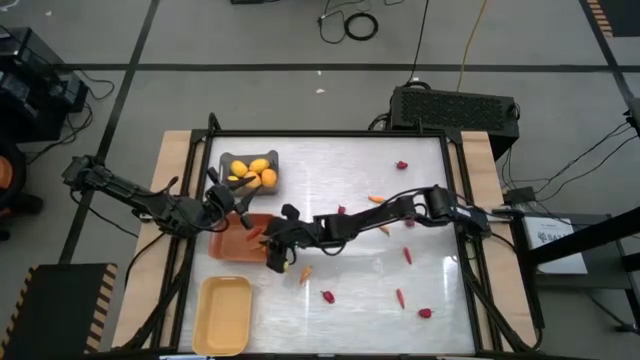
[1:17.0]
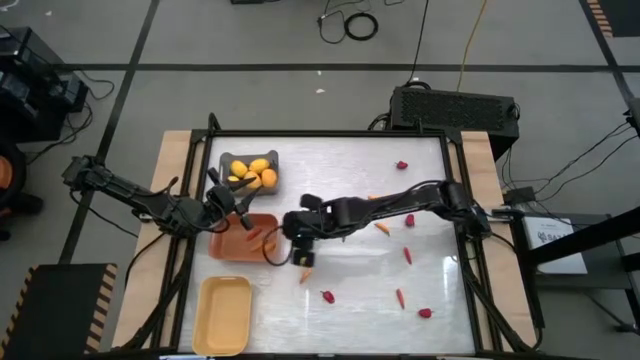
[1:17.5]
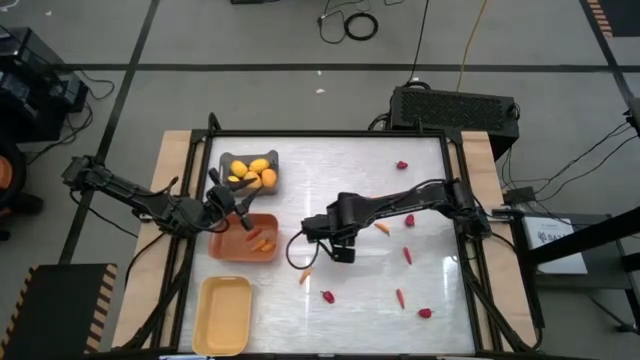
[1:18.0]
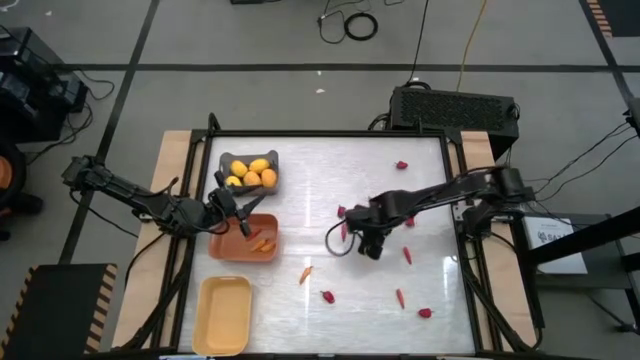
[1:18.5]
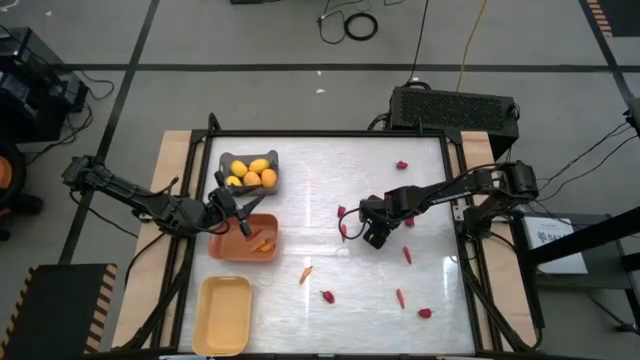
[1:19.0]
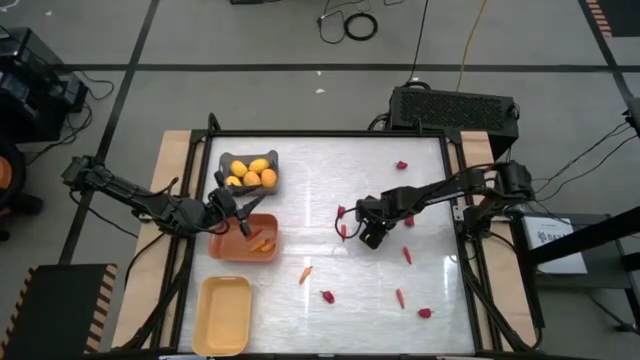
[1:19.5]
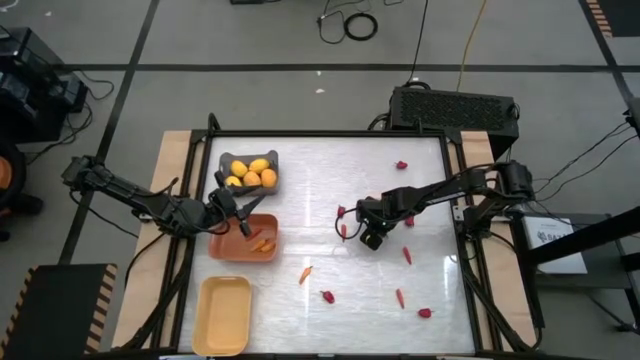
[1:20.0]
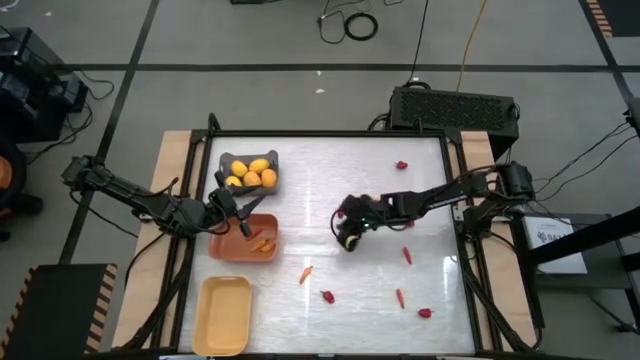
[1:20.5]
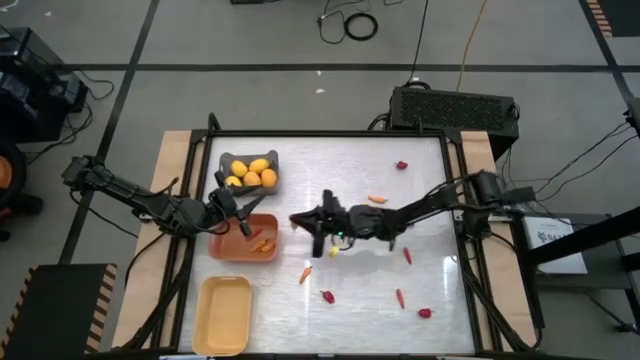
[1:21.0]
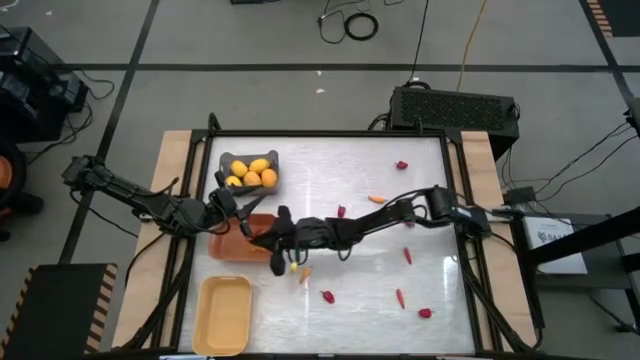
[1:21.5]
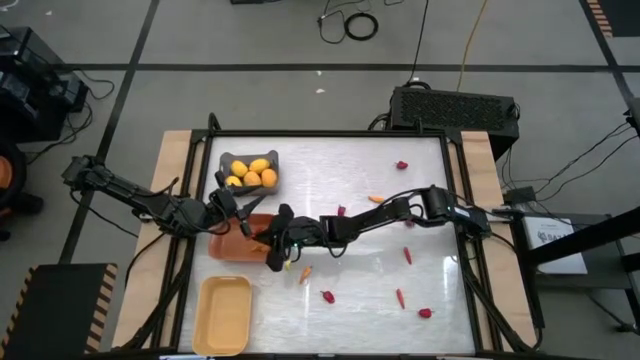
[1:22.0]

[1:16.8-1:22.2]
Task: Sort produce into baskets
Put the yellow chili pepper into the orange bin

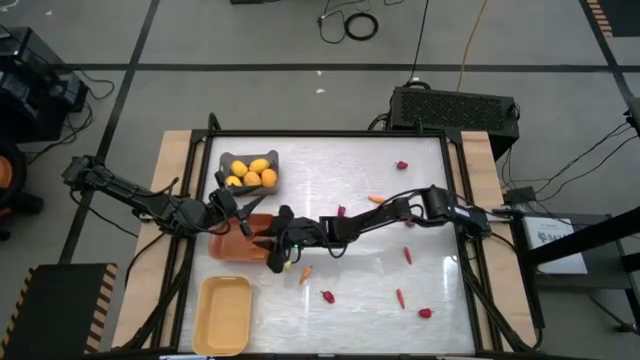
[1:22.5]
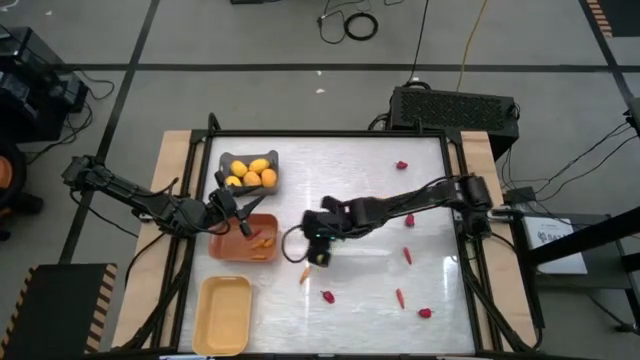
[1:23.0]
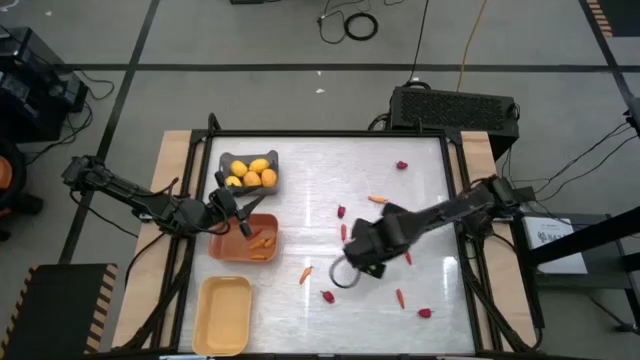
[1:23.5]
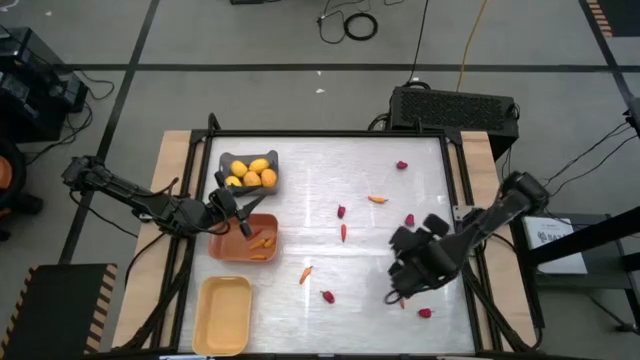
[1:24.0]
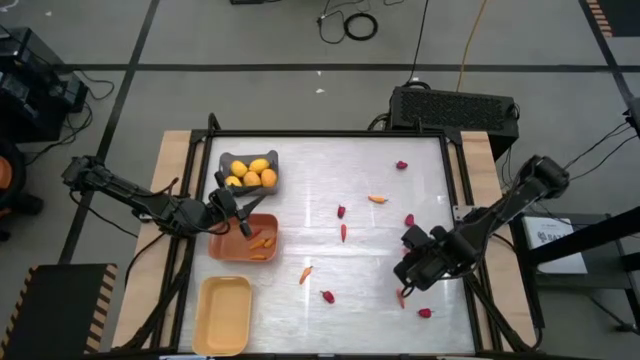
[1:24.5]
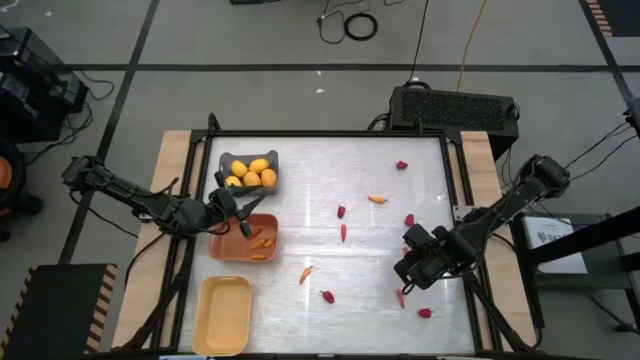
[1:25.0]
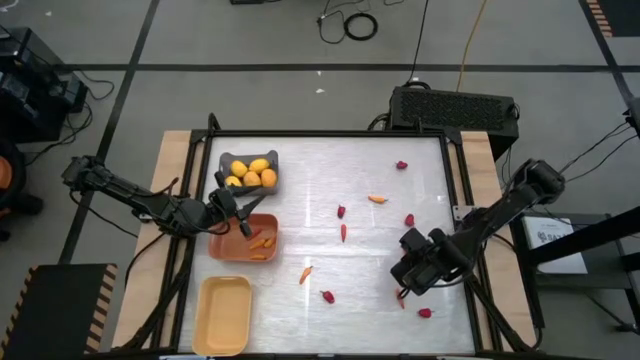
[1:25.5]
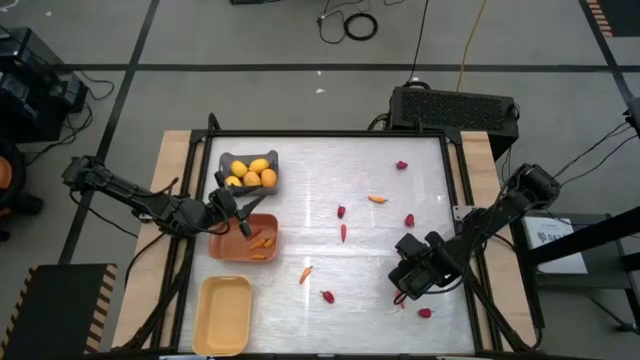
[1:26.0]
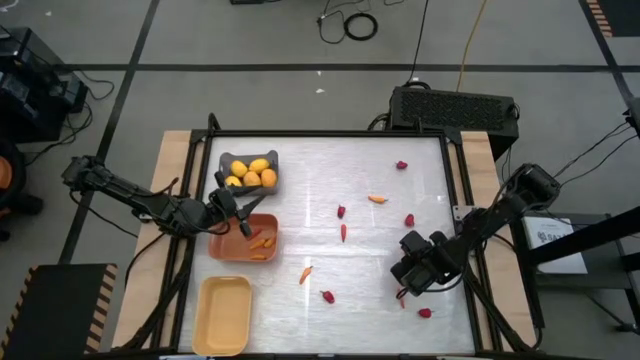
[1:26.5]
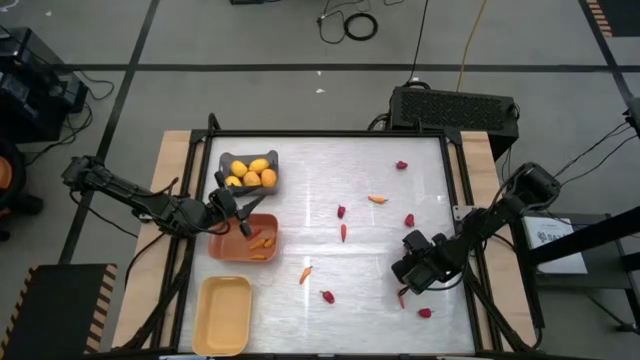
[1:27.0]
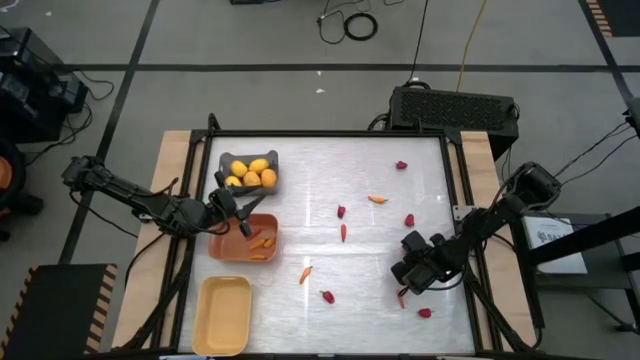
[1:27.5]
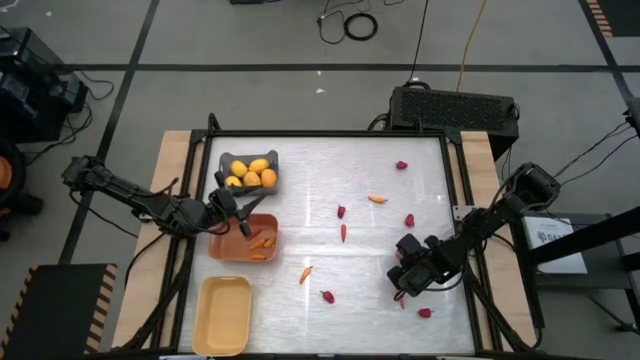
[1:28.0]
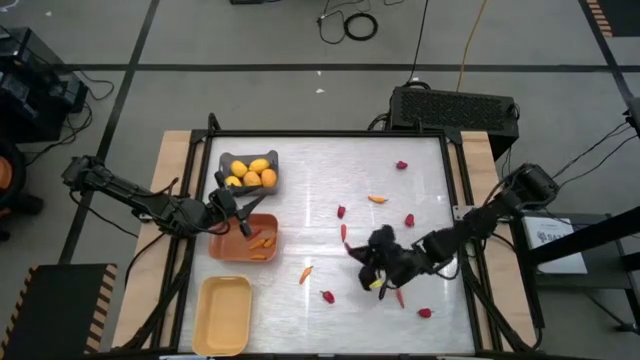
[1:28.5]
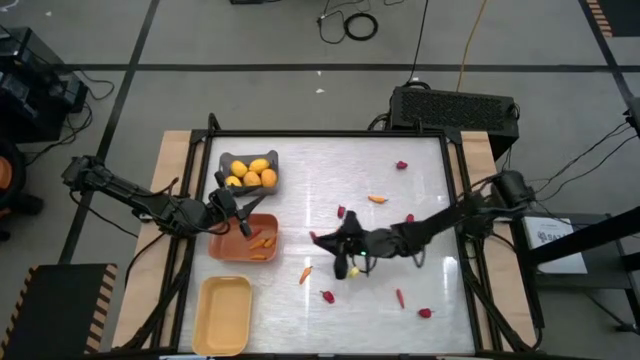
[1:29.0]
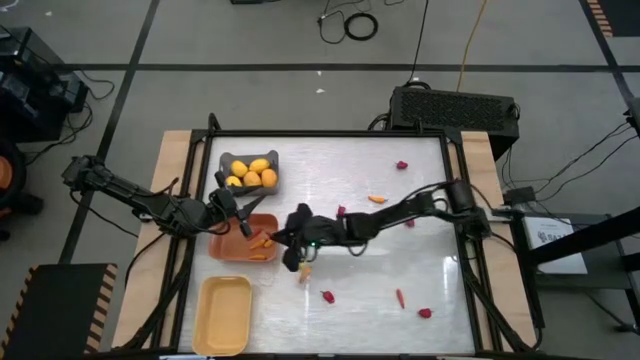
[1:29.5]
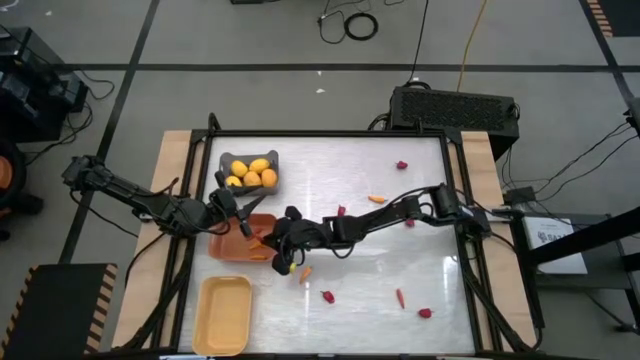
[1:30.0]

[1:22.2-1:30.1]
Put the orange chili pepper into the orange bin

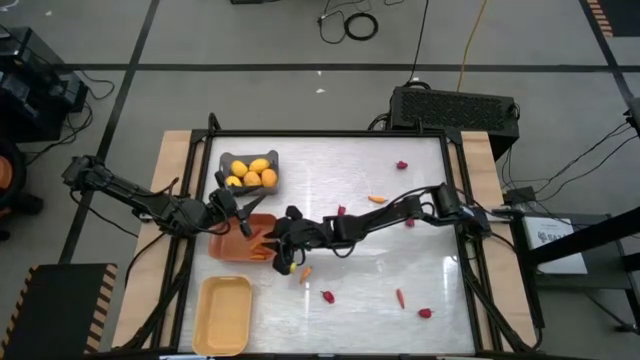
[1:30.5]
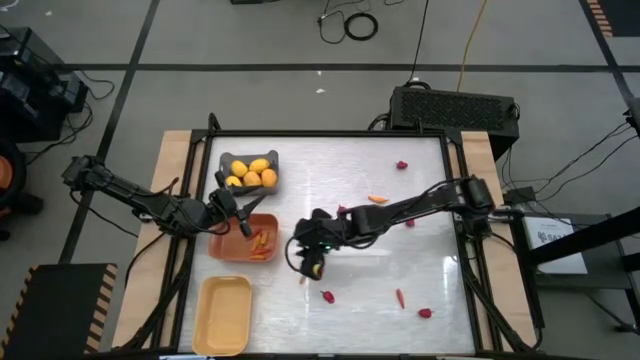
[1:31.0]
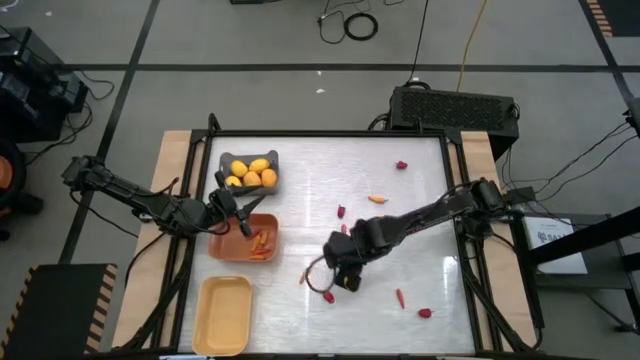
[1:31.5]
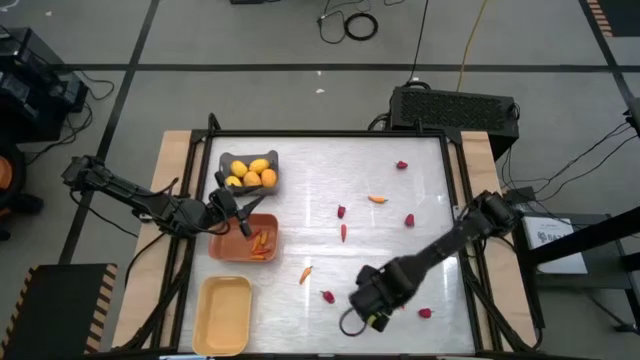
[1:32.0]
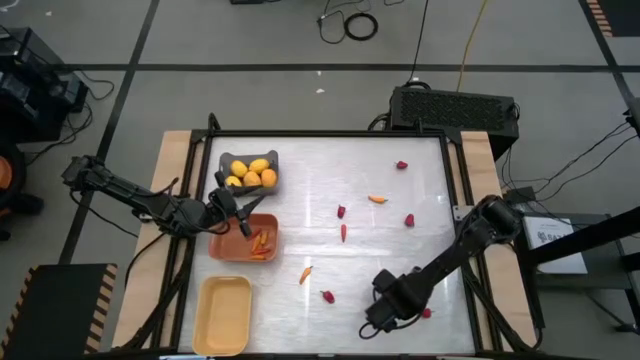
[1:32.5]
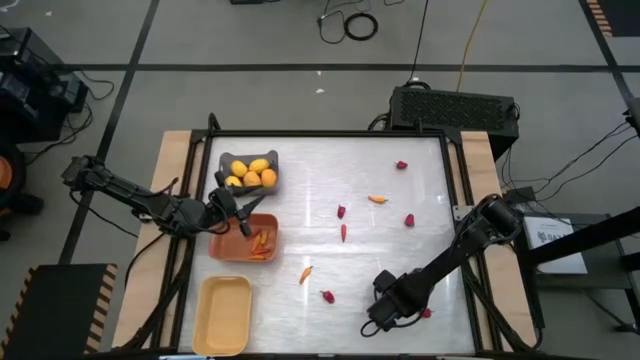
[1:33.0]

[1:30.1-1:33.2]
Put the orange chili pepper into the orange bin

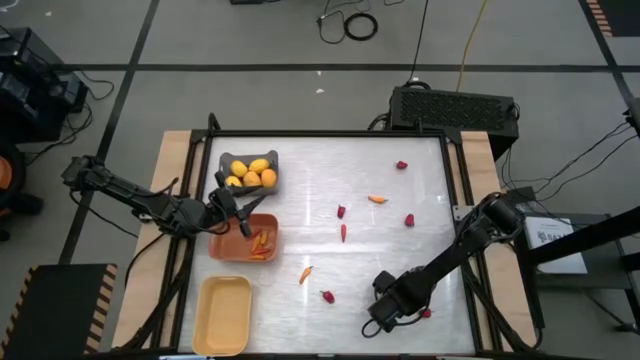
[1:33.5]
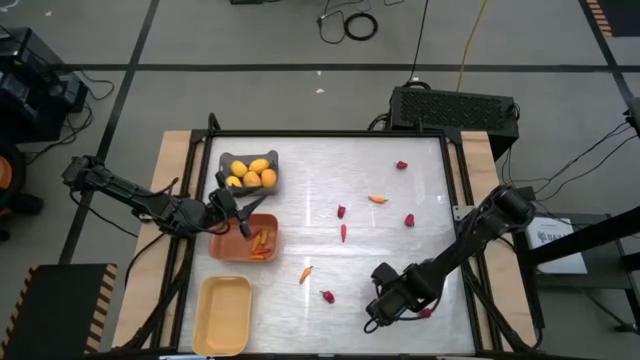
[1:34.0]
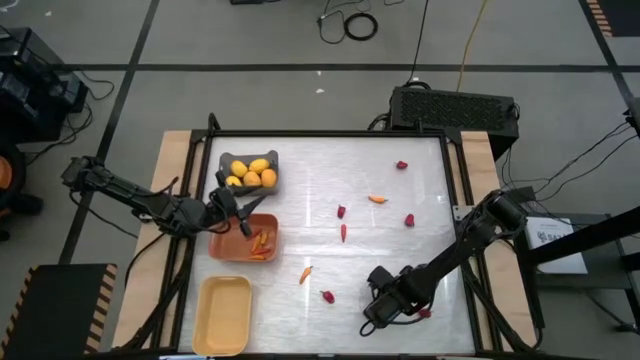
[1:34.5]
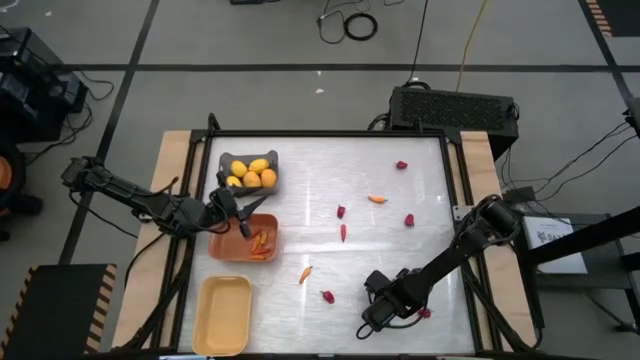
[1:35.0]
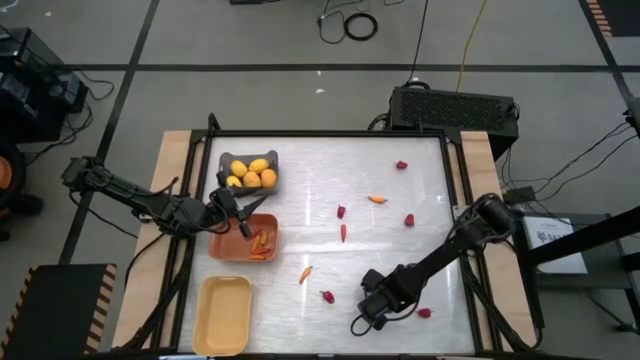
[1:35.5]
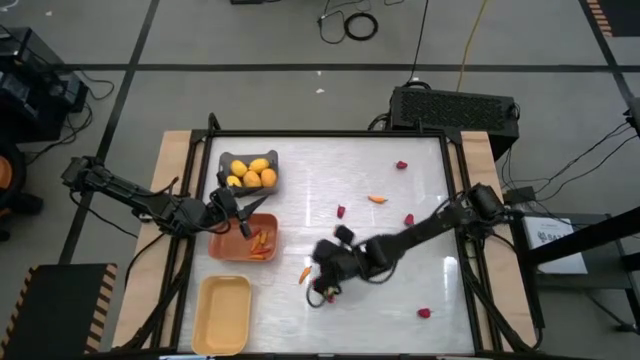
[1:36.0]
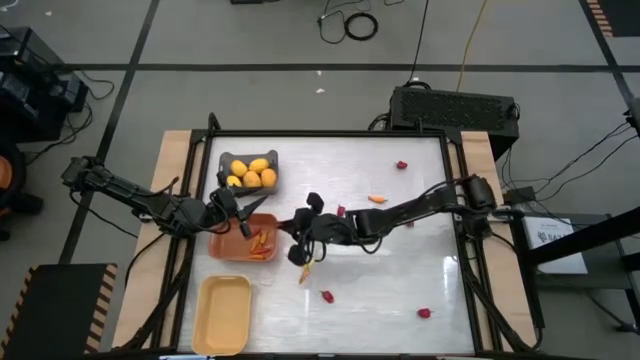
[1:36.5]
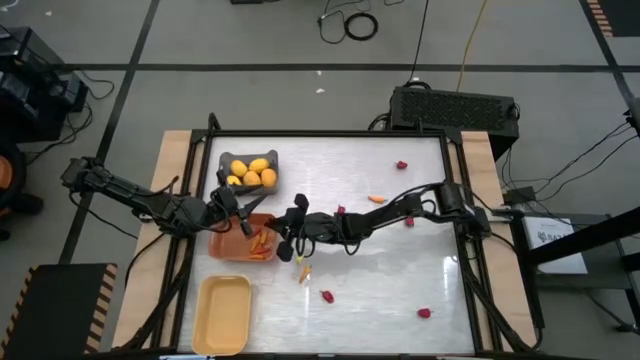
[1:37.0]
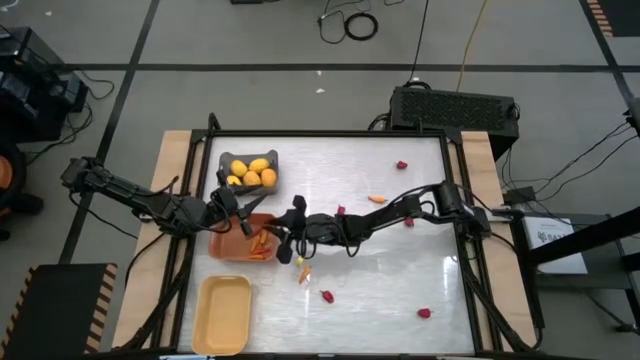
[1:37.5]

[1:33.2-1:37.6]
Put the orange chili pepper into the orange bin
